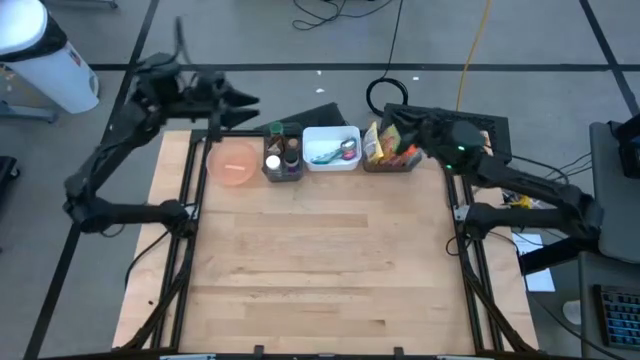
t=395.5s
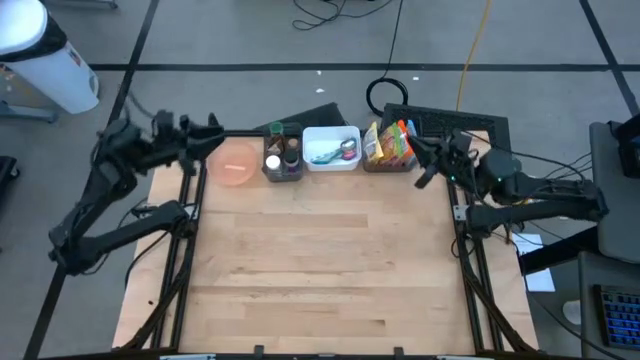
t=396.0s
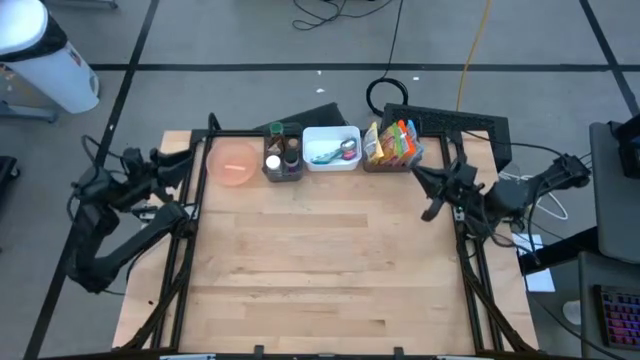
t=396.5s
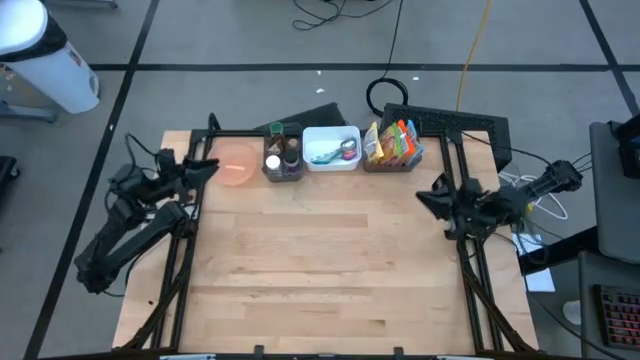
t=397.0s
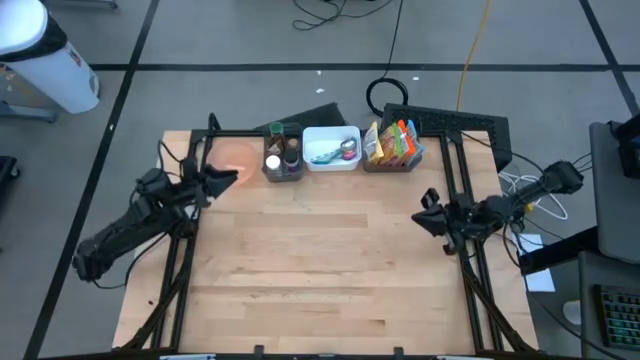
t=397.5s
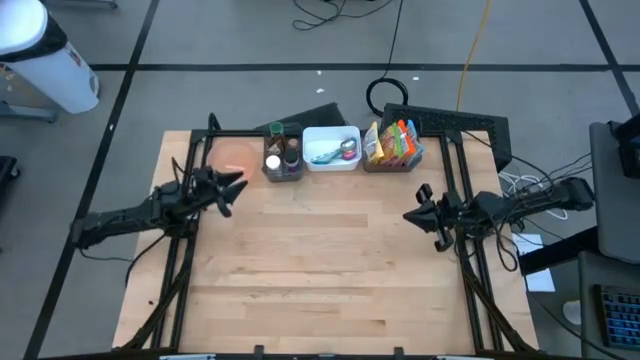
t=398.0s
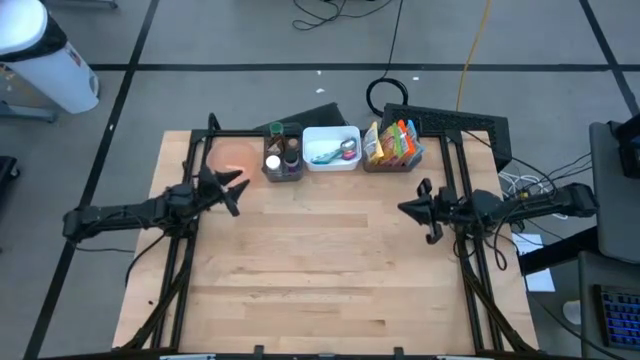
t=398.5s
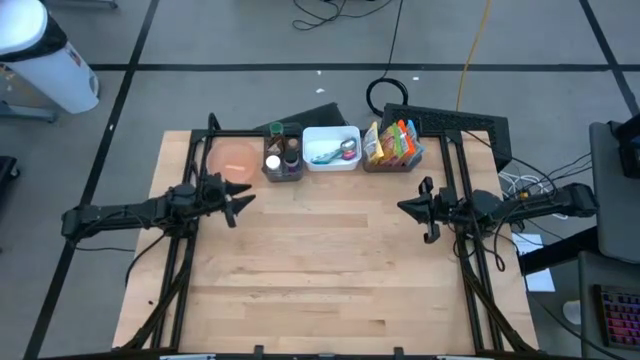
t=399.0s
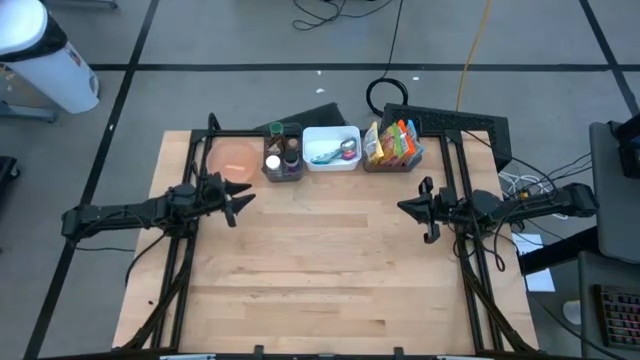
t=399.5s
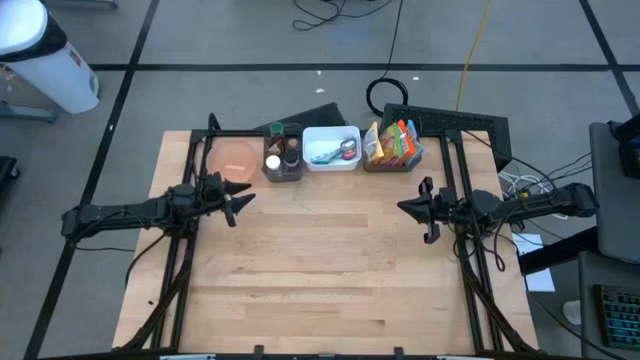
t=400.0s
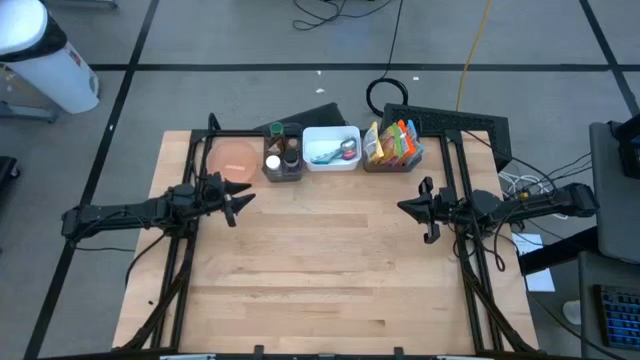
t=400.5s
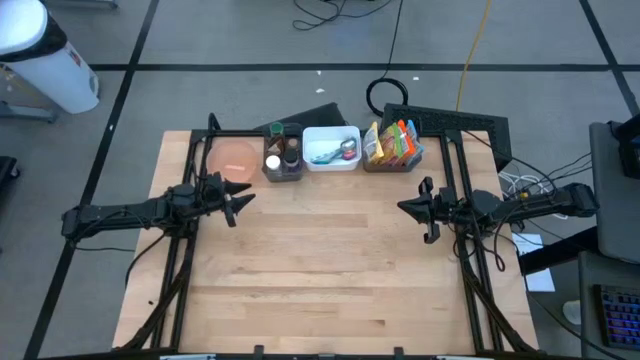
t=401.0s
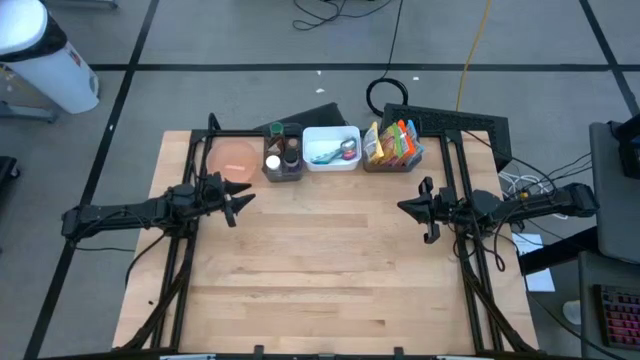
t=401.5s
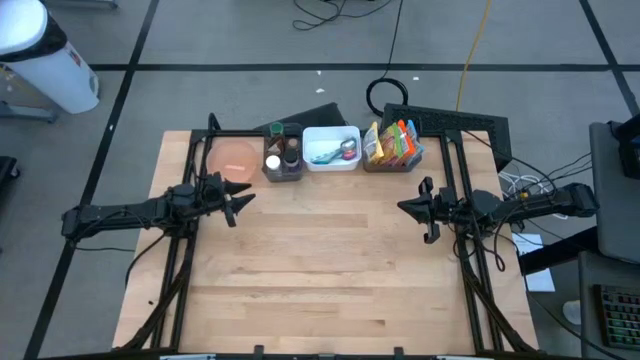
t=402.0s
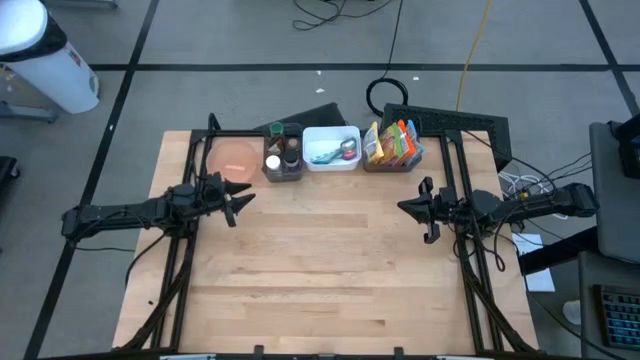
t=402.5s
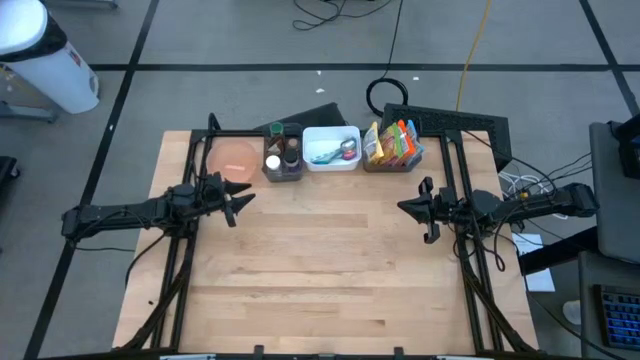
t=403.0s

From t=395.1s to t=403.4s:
Task: Pick & Place Food Item
Return to Home Position

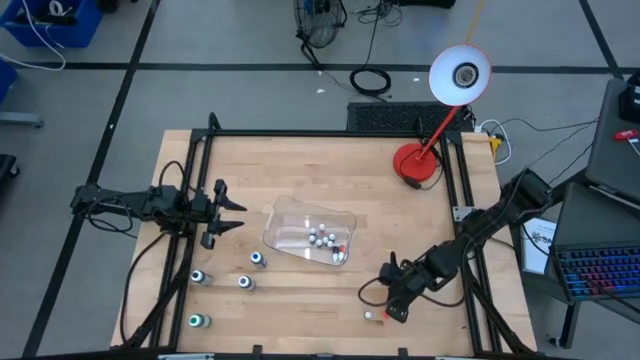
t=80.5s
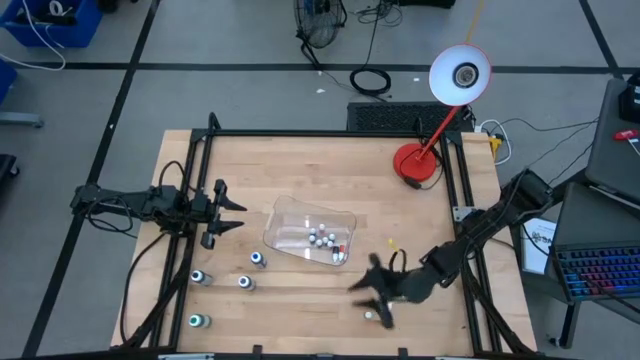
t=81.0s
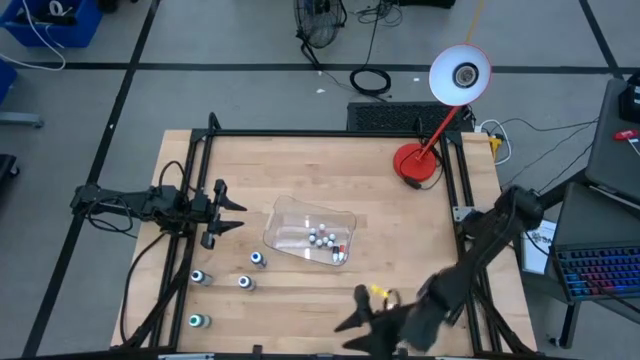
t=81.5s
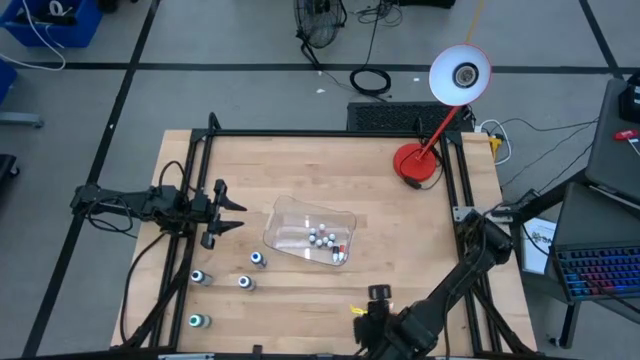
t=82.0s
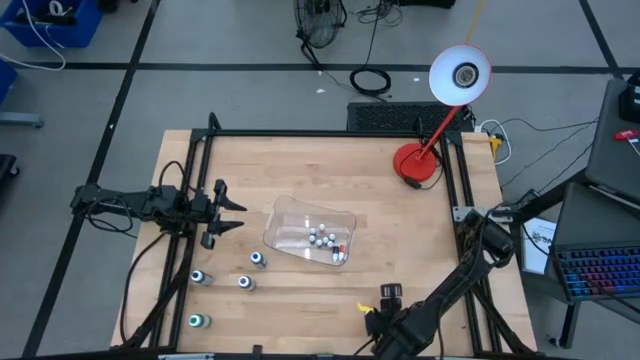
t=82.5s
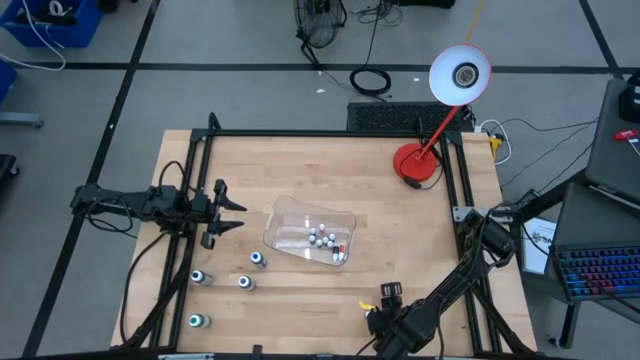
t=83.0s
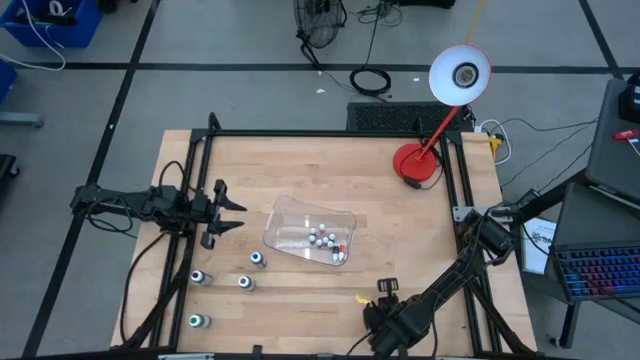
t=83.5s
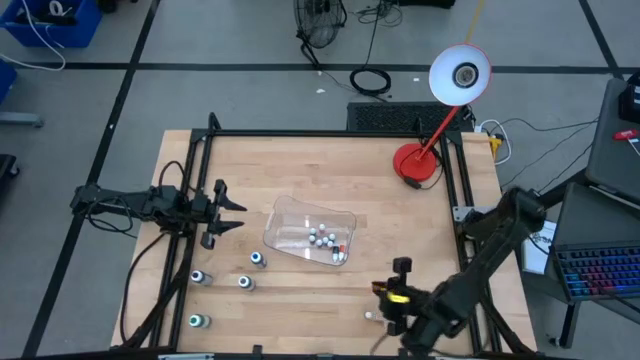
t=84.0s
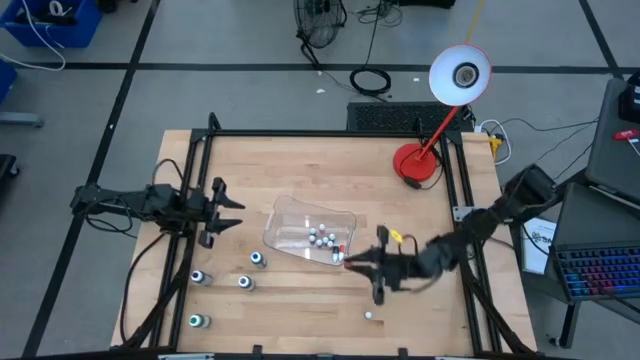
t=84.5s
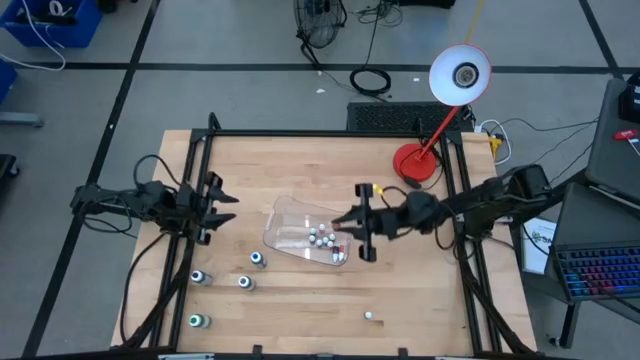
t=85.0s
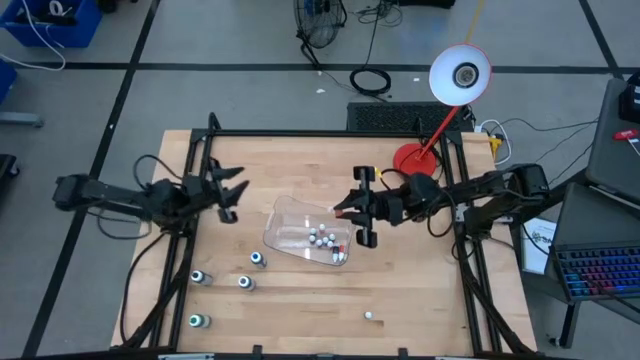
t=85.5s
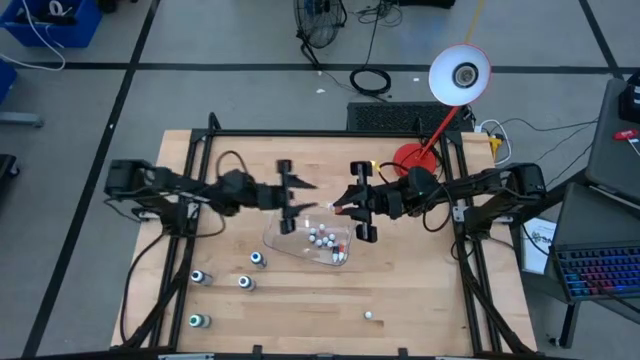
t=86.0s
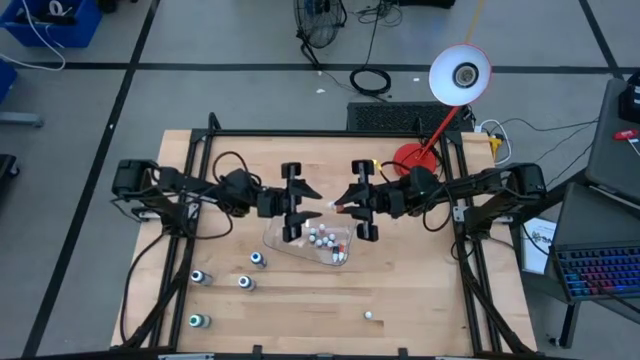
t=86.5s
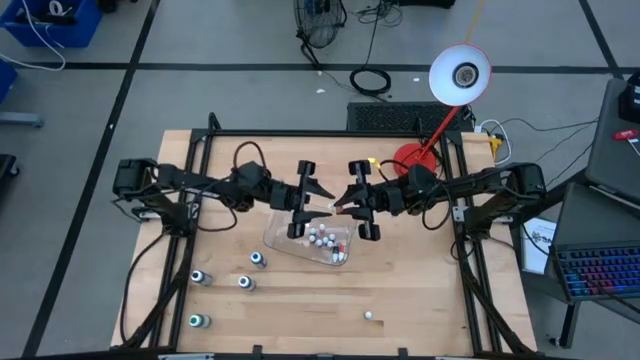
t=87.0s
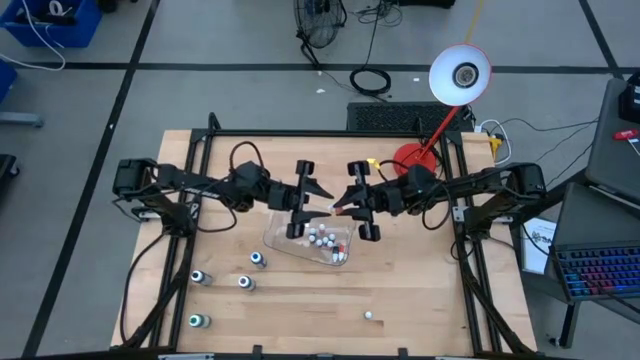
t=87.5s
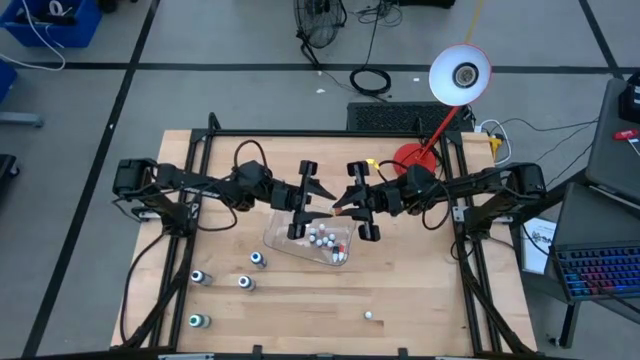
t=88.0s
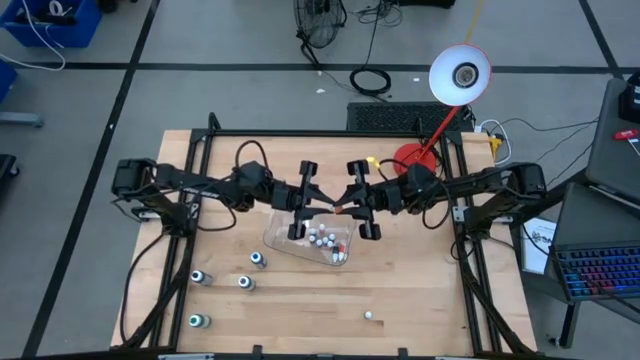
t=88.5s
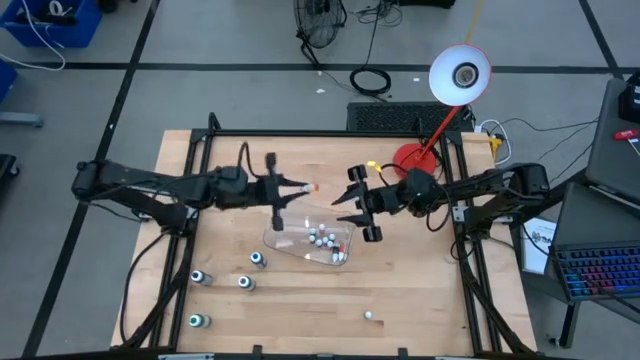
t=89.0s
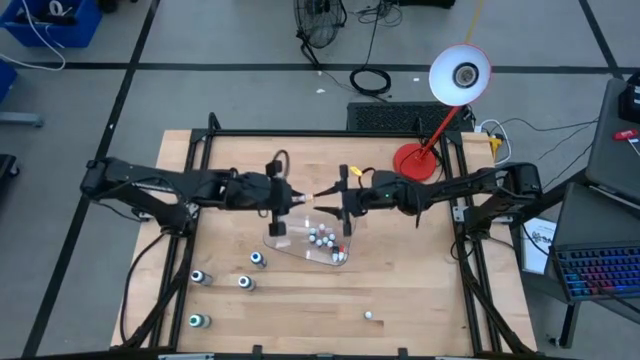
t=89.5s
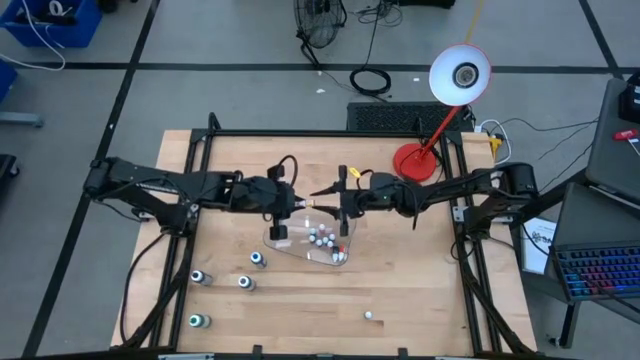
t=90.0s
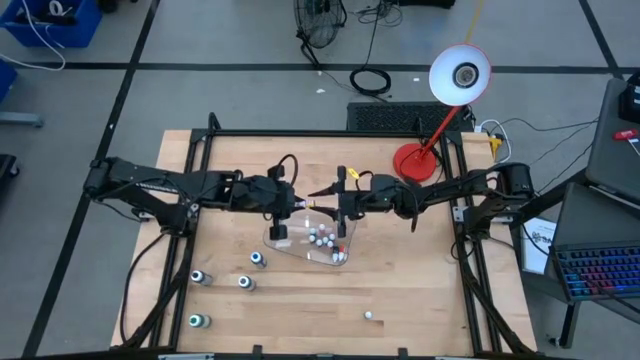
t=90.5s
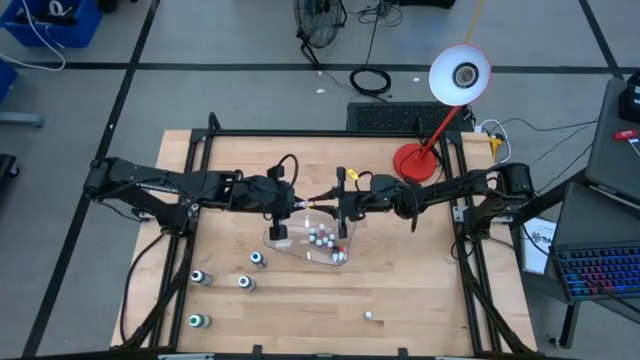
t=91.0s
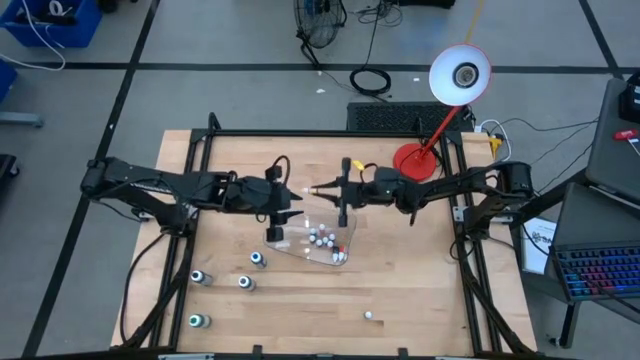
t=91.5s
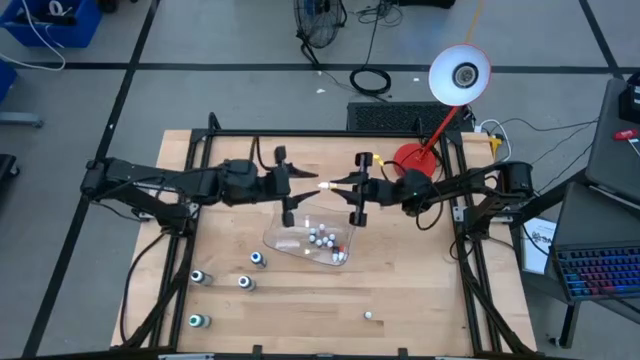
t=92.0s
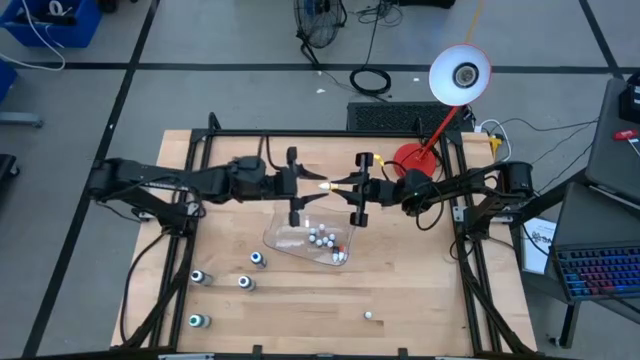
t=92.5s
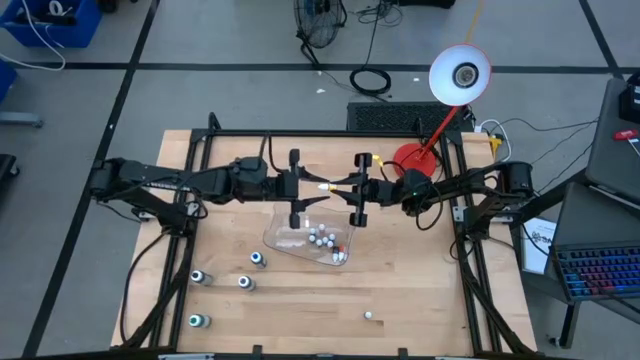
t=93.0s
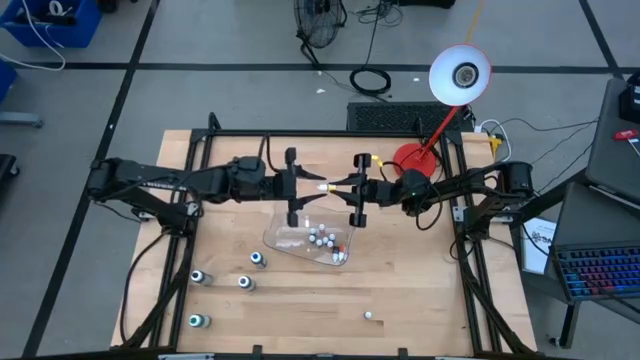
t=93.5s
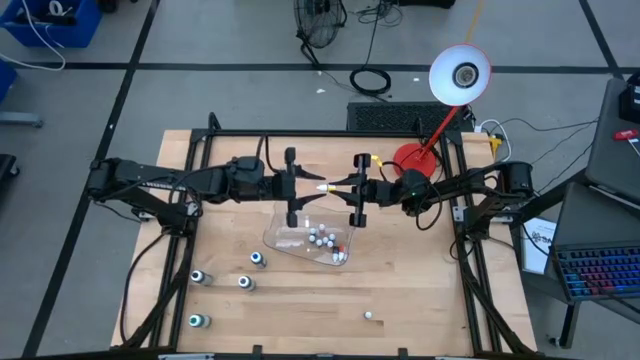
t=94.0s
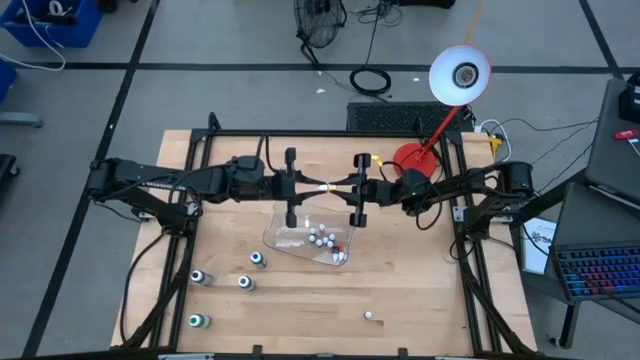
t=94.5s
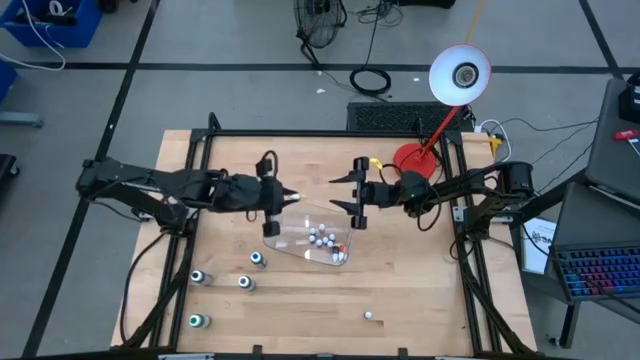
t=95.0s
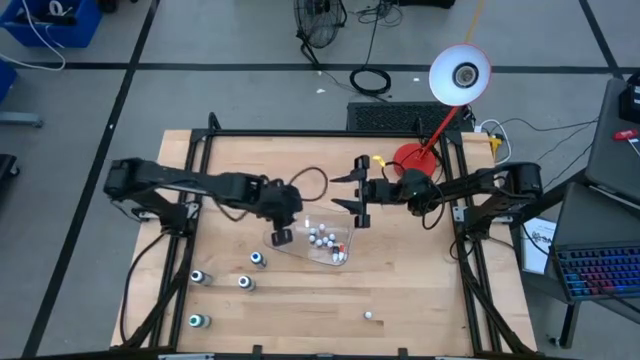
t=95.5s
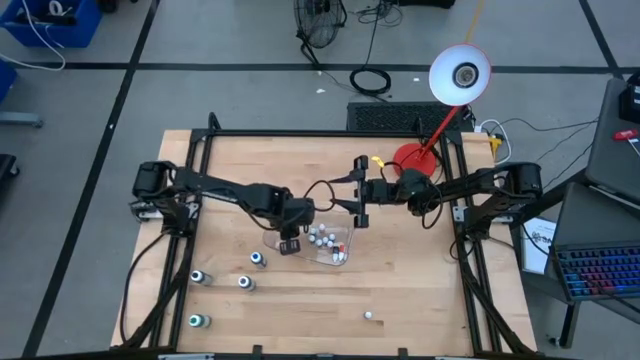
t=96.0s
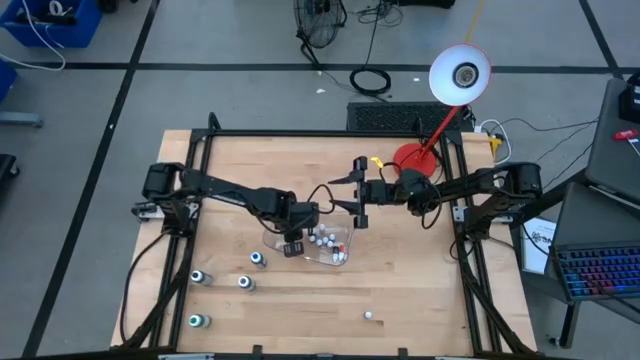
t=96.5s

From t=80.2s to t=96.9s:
Task: Pick & Place food coloring
Put the small orange food coloring bottle into the transparent bin
